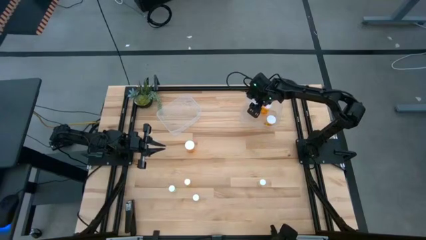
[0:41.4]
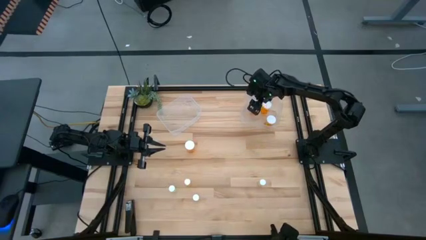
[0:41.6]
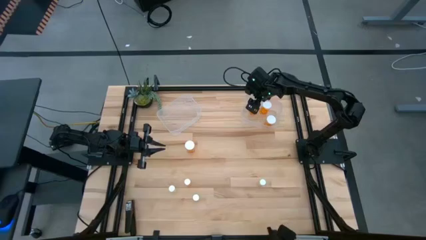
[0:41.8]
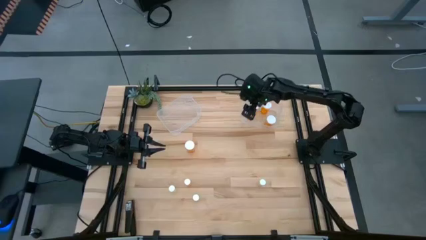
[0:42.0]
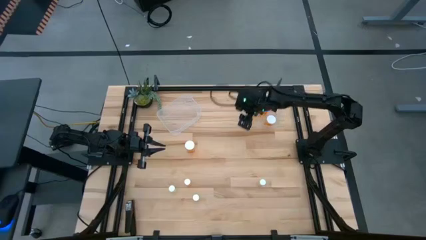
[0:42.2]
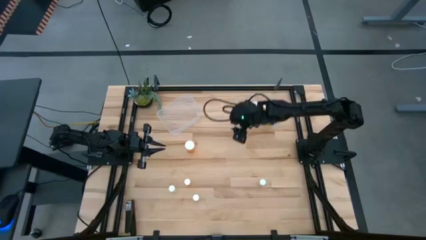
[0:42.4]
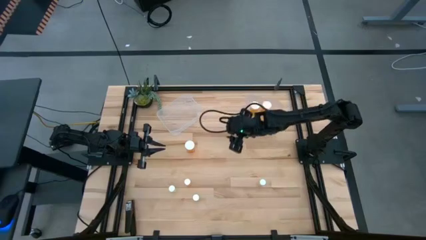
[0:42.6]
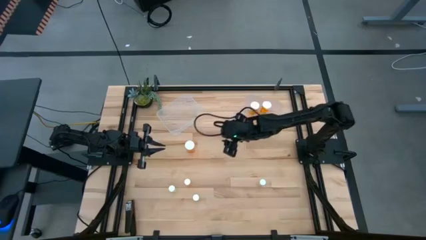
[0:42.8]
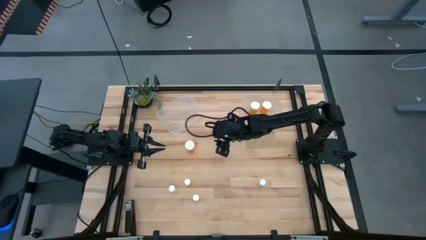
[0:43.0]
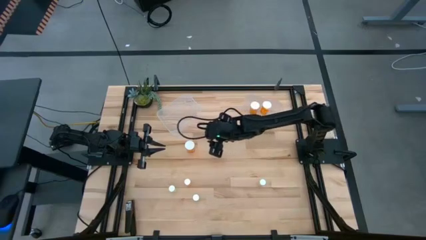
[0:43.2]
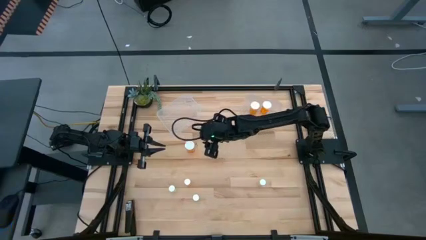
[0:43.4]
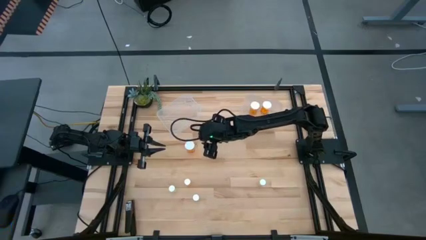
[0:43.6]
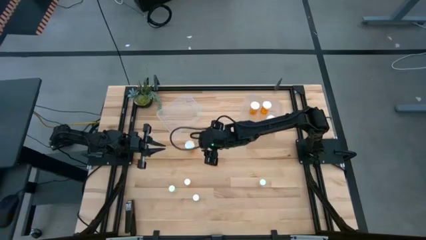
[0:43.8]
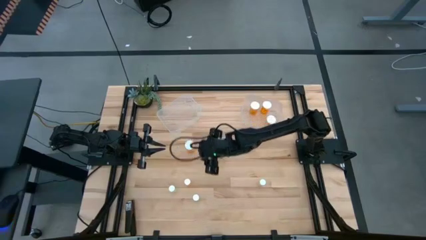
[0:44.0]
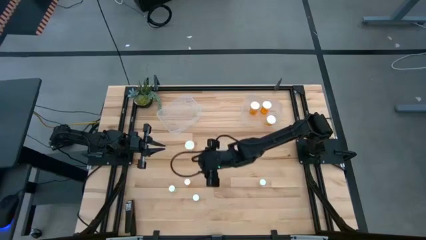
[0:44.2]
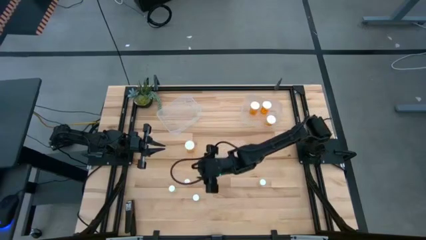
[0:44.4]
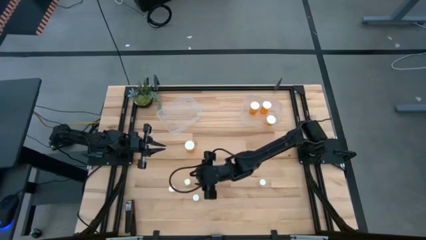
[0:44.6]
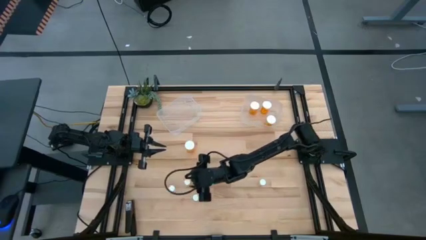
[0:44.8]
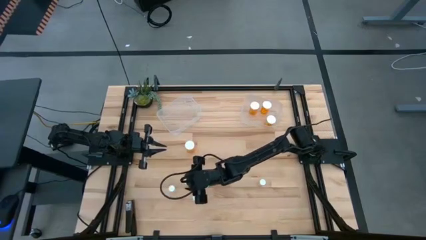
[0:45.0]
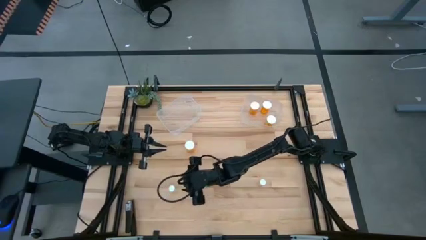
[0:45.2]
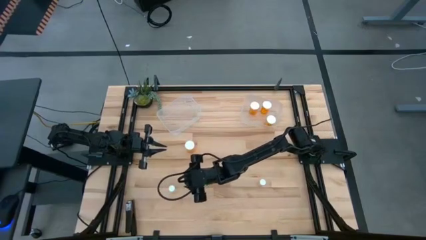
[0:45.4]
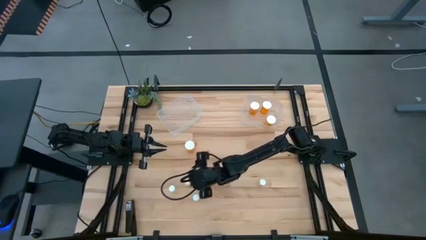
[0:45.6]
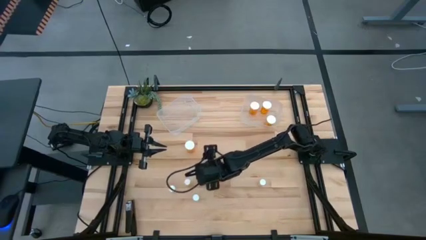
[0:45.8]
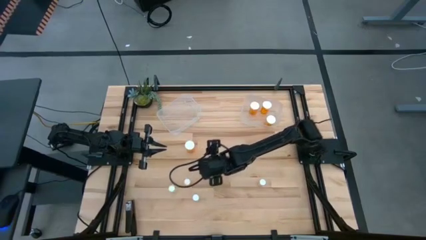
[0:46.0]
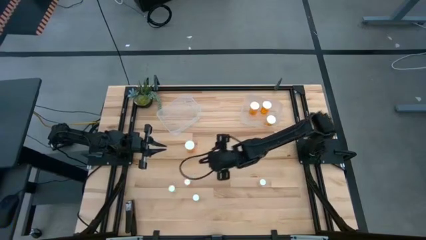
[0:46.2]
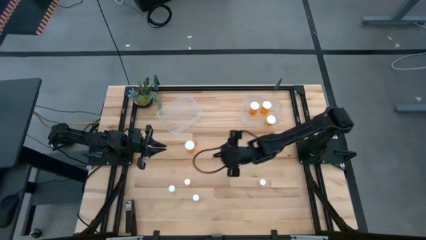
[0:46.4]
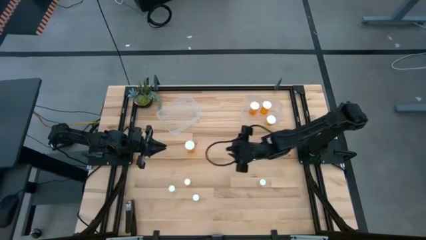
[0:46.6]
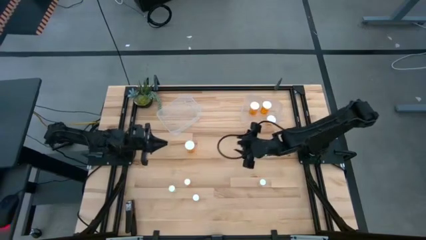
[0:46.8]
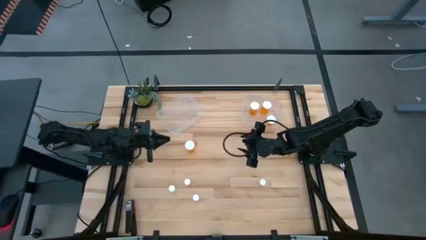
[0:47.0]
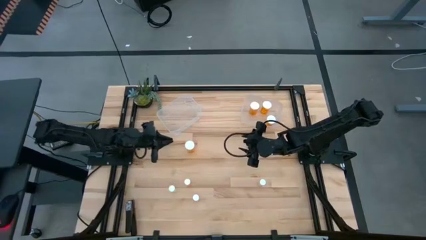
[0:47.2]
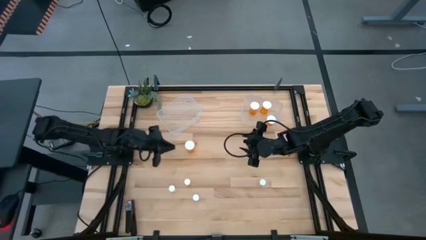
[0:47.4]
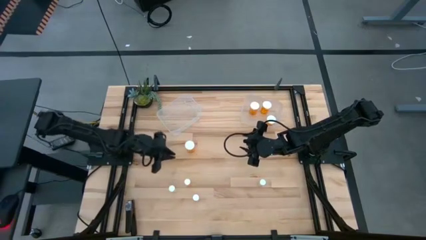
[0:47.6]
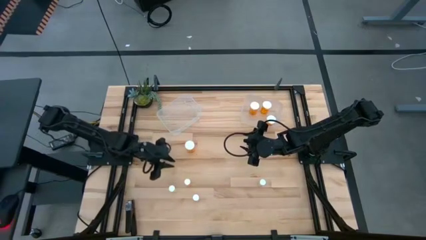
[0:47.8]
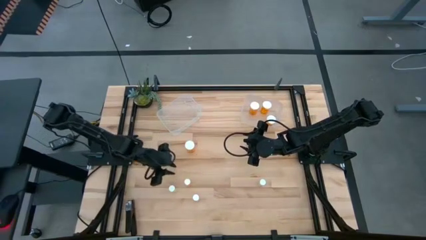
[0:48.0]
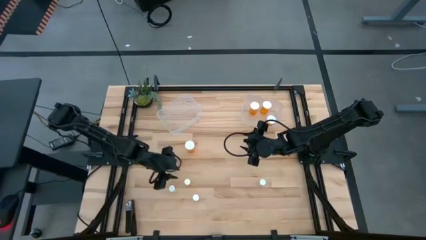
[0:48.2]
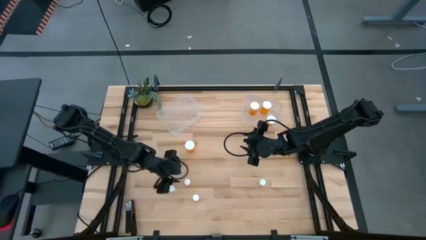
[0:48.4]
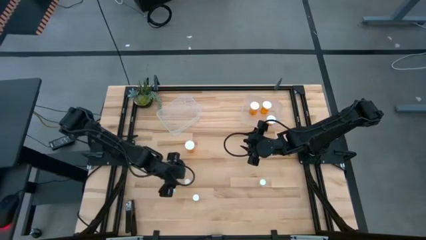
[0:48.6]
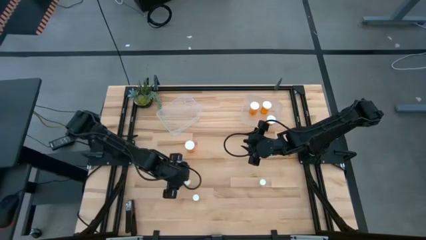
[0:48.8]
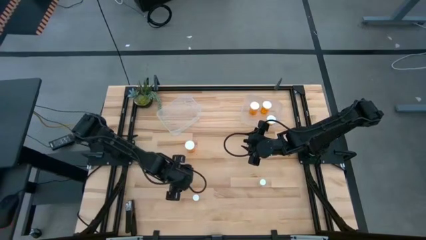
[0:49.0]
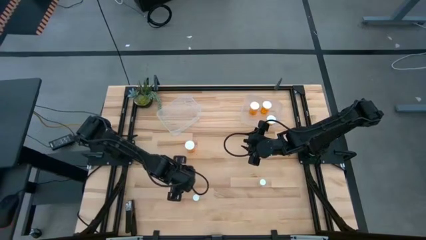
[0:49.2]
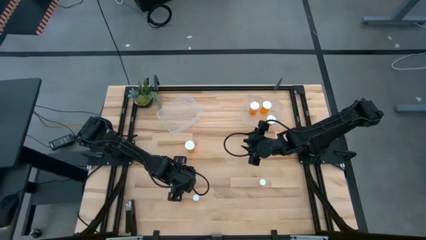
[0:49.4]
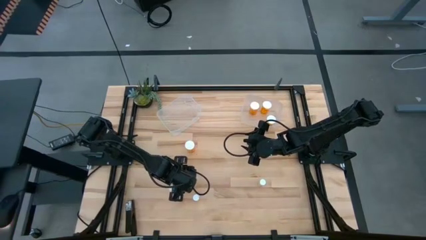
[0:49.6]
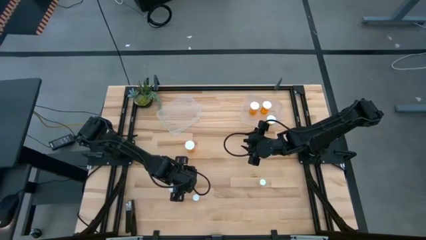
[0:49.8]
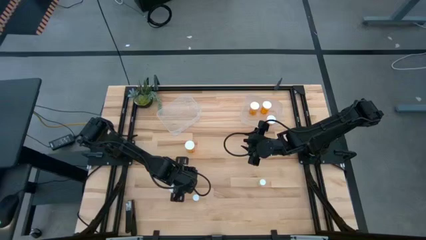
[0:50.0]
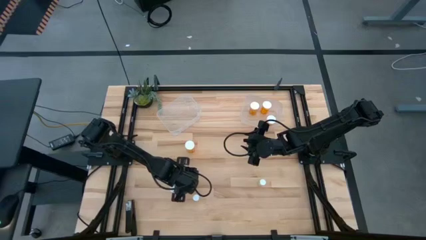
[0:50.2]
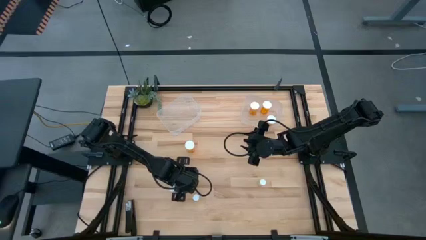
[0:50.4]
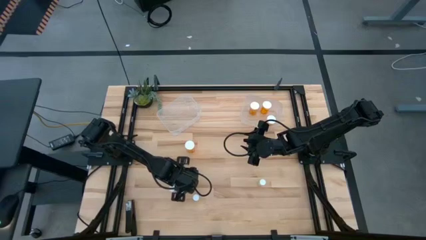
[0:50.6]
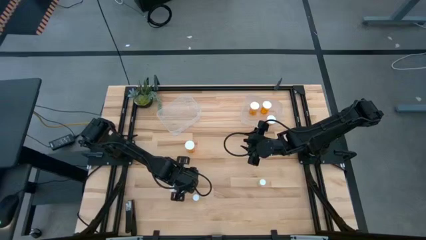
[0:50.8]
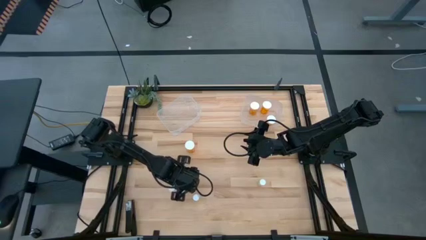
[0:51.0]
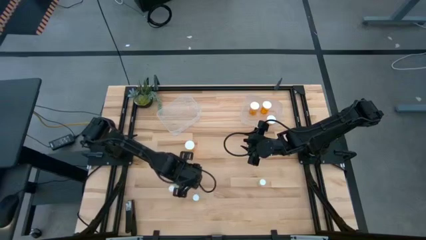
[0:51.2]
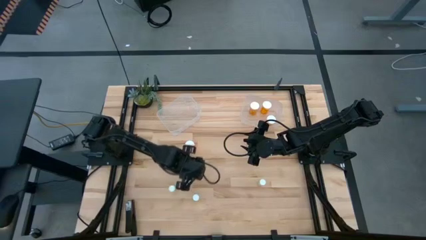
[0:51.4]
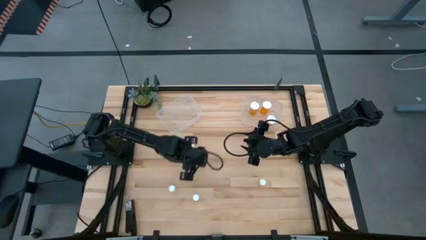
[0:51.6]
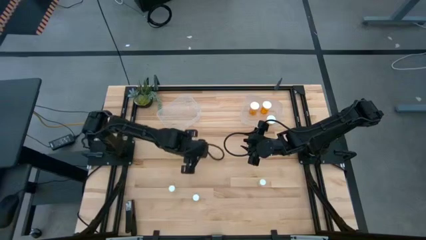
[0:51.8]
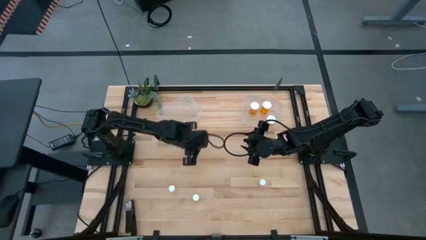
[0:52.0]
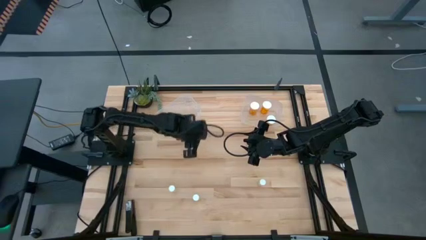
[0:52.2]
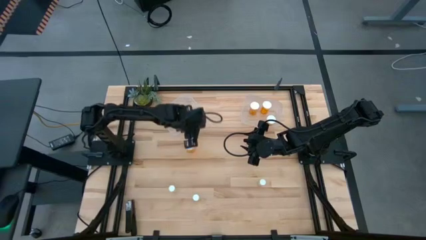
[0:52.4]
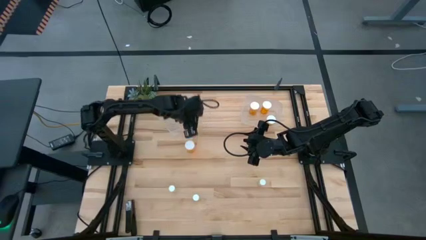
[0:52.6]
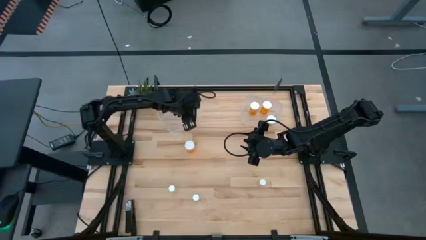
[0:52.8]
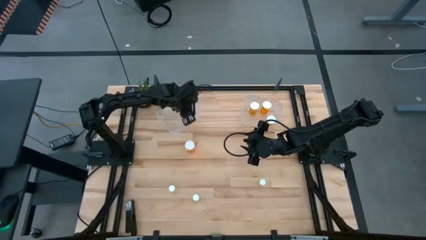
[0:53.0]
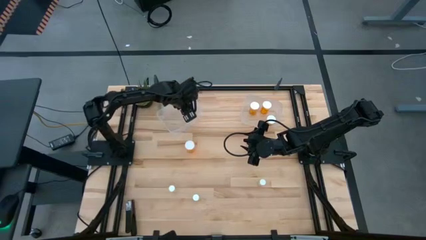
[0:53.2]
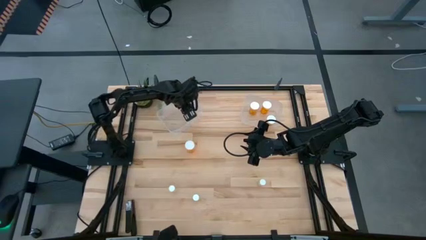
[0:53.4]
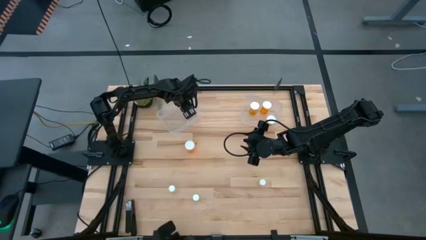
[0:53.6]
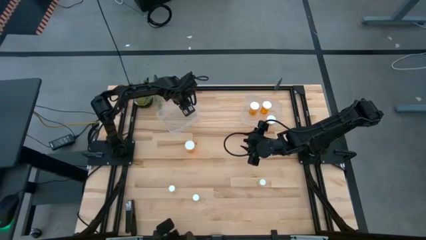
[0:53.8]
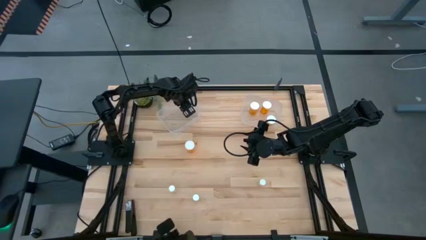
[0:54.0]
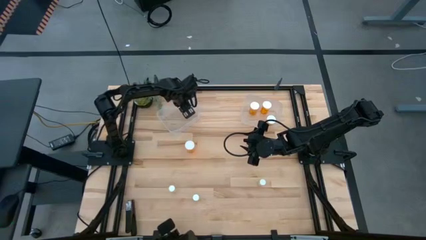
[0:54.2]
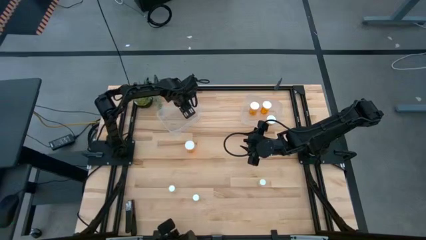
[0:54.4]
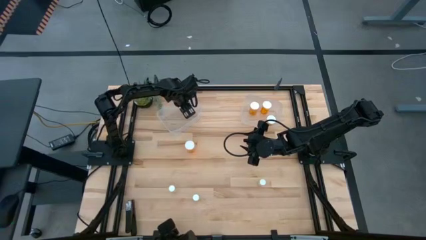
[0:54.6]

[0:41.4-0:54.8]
Task: Pick and place medicine bottles into bin by pill shape (circle, oval)
Put the small orange pill bottle into the left transparent bin

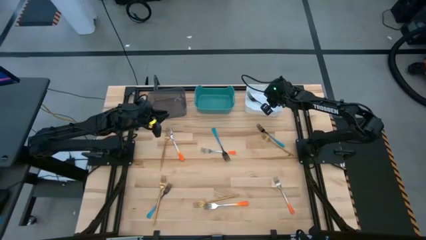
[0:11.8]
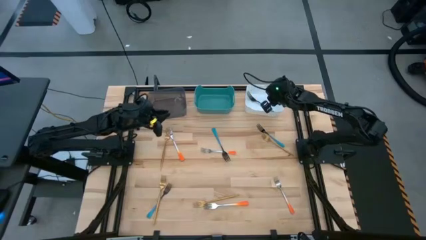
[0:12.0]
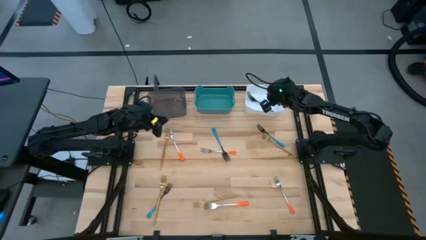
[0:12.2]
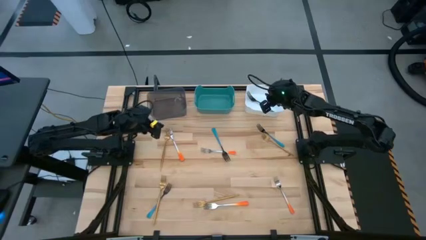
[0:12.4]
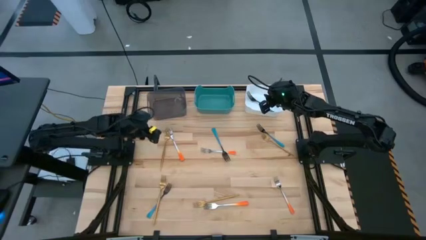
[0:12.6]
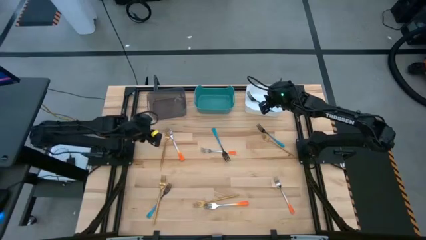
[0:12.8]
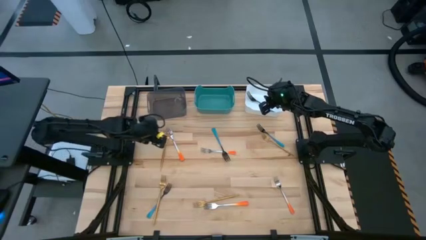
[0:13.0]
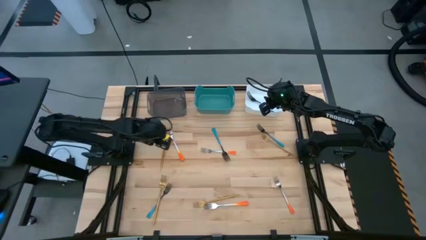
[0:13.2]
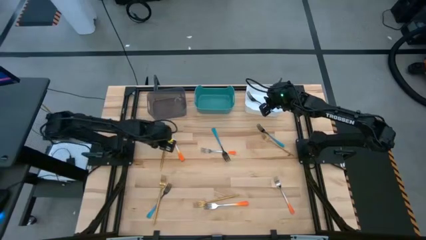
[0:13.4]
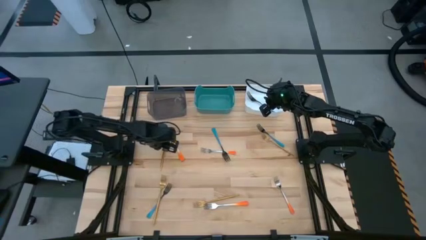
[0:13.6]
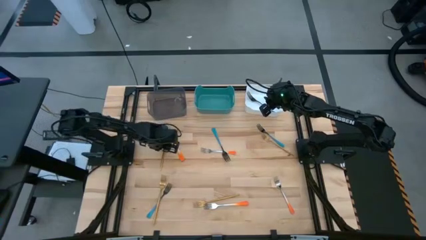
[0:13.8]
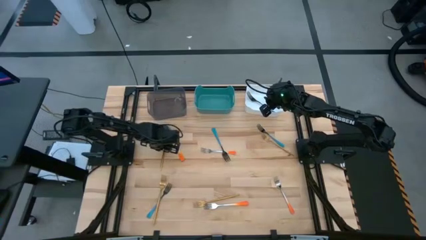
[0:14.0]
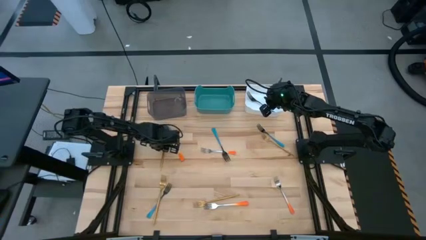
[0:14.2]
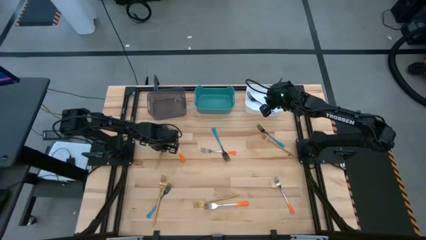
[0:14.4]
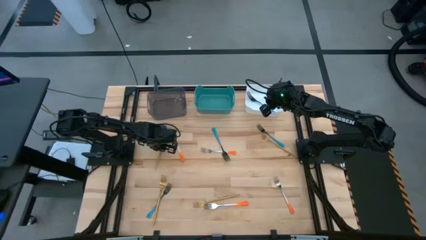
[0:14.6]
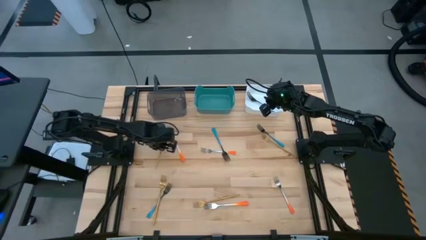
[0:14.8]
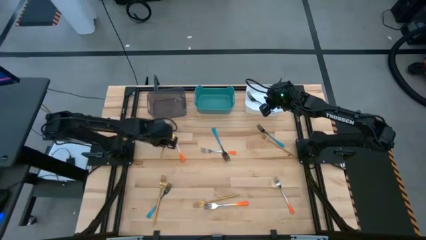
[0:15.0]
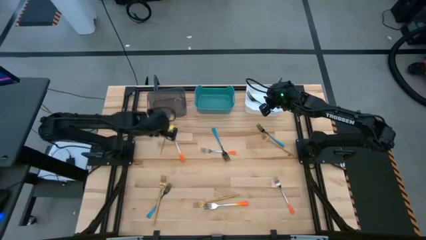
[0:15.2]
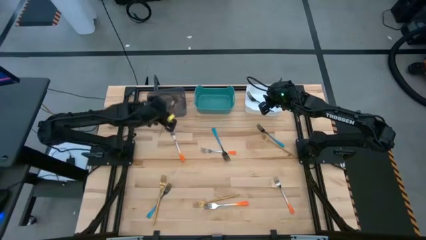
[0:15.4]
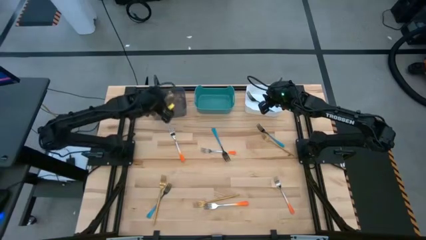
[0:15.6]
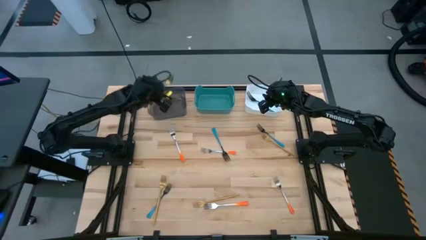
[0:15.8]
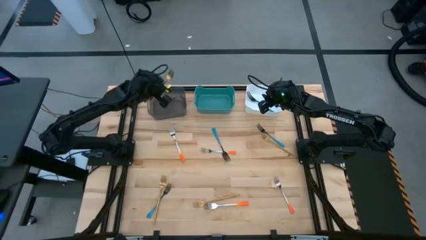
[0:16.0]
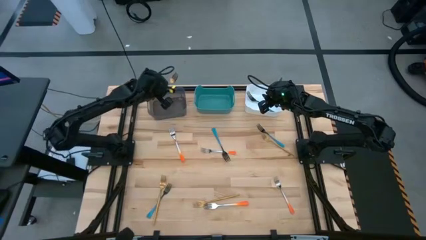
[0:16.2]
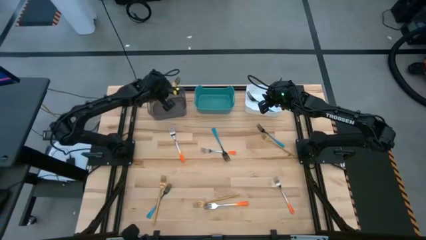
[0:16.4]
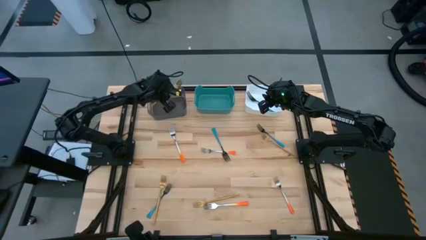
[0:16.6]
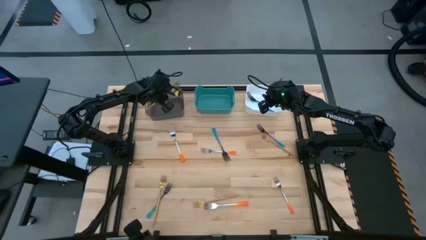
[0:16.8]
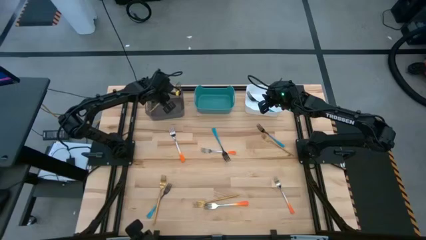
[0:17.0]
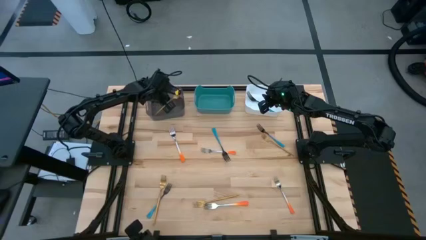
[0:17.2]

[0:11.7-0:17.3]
Task: Sort silverware by color (type)
Put the gold fork into the black bin
